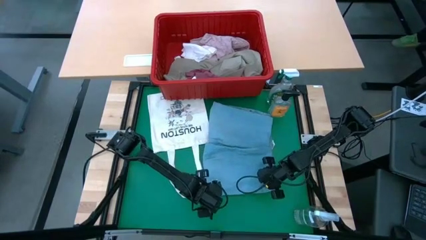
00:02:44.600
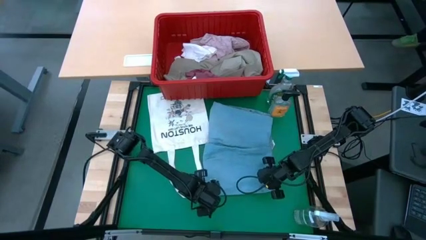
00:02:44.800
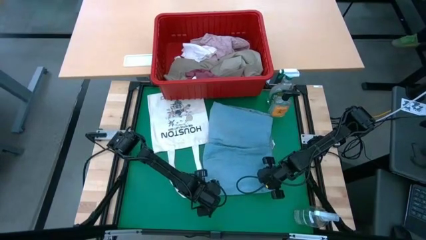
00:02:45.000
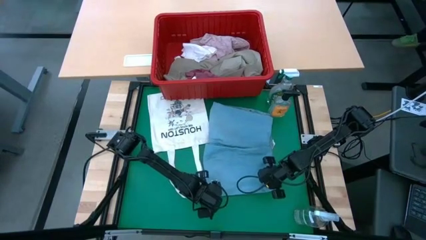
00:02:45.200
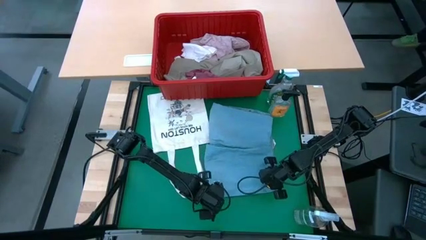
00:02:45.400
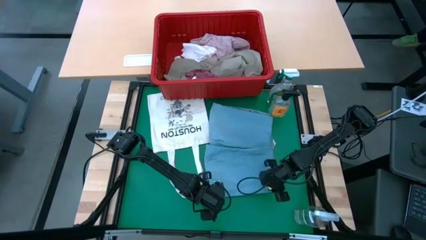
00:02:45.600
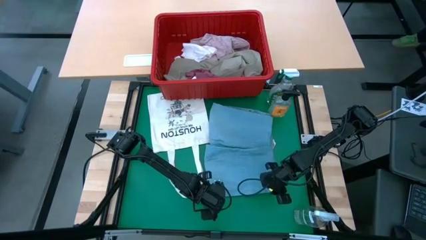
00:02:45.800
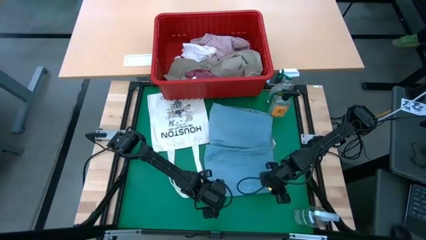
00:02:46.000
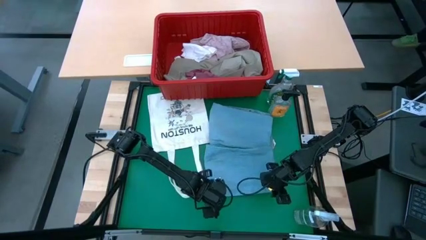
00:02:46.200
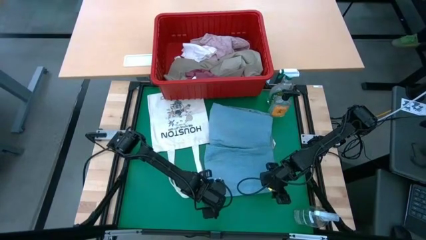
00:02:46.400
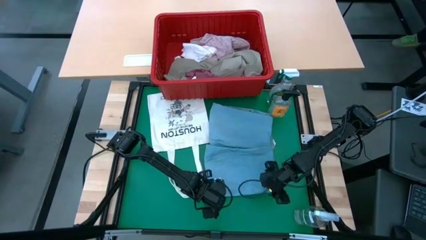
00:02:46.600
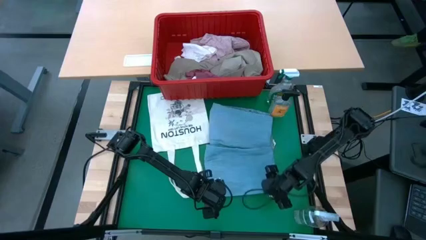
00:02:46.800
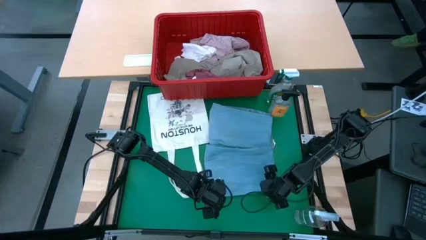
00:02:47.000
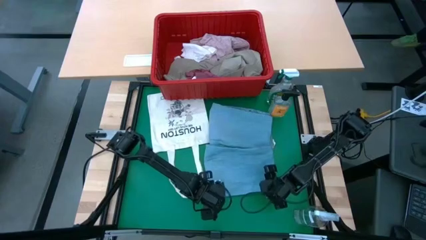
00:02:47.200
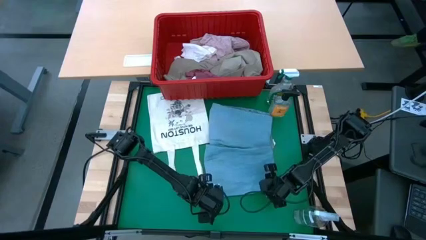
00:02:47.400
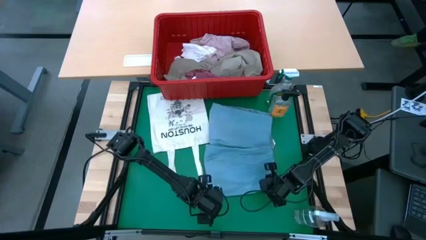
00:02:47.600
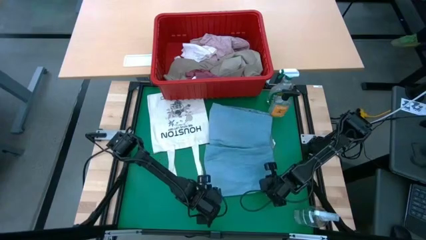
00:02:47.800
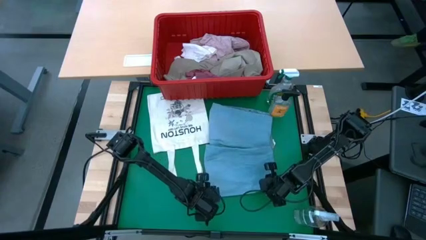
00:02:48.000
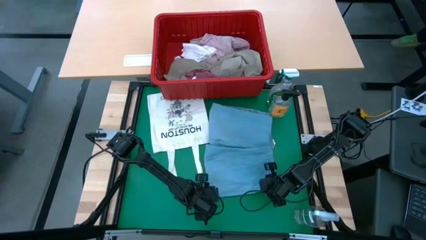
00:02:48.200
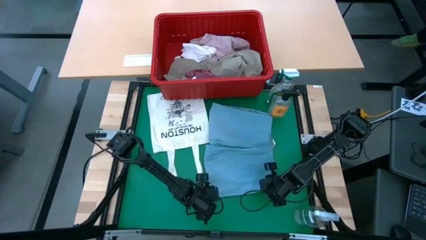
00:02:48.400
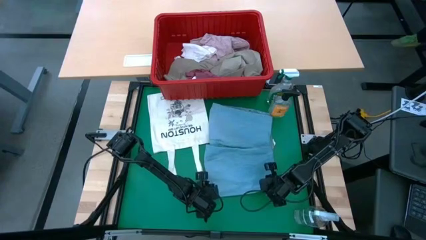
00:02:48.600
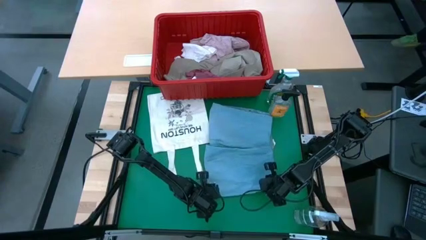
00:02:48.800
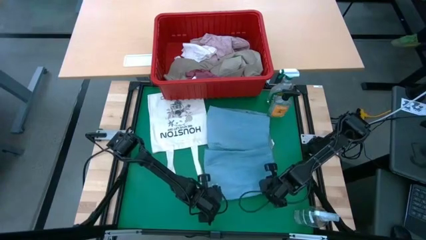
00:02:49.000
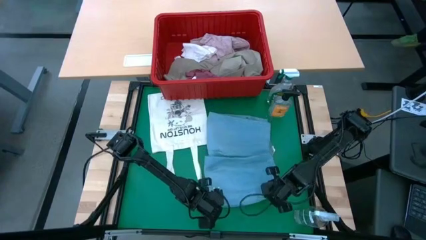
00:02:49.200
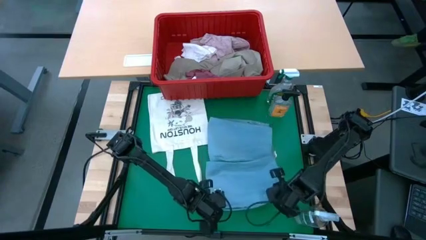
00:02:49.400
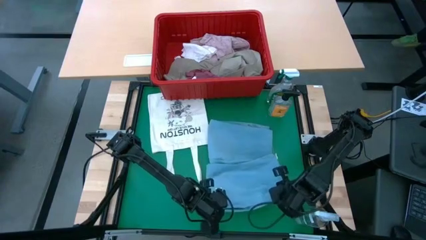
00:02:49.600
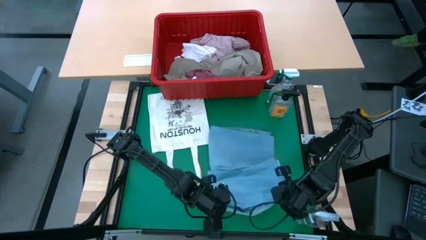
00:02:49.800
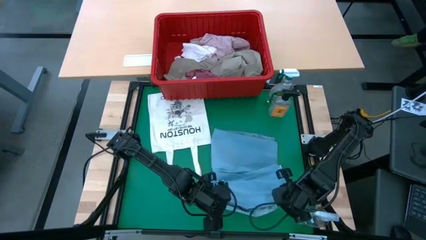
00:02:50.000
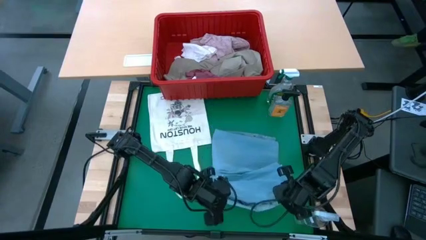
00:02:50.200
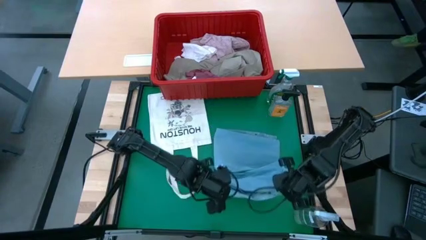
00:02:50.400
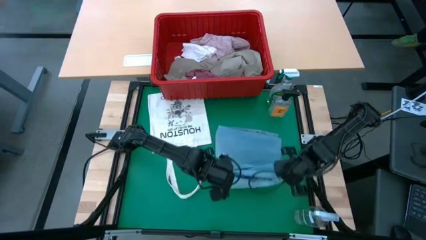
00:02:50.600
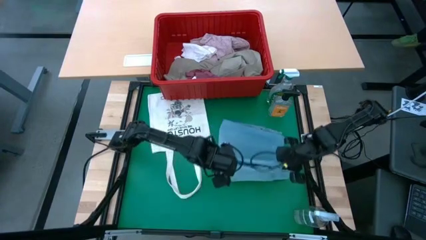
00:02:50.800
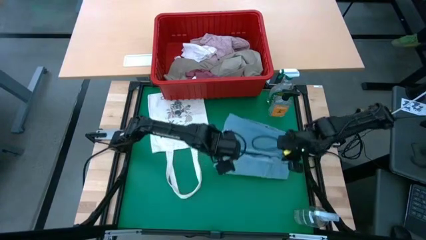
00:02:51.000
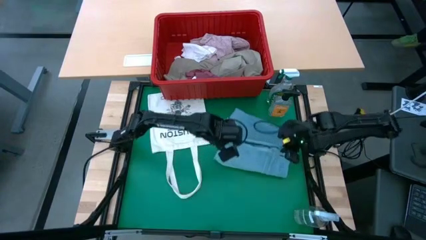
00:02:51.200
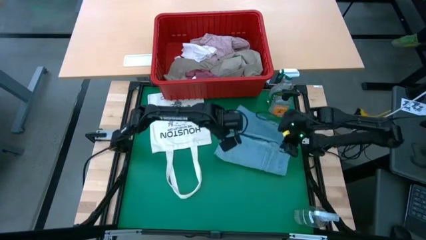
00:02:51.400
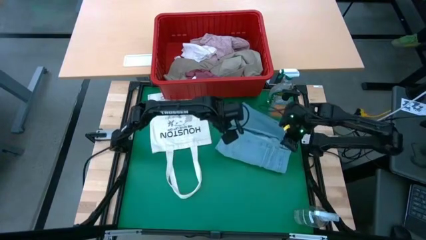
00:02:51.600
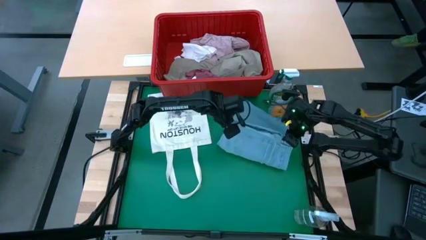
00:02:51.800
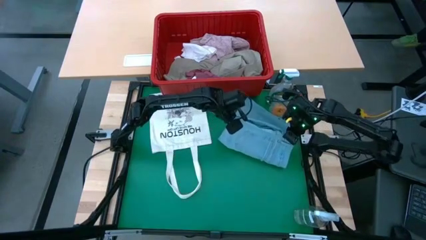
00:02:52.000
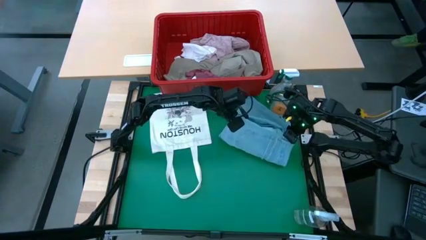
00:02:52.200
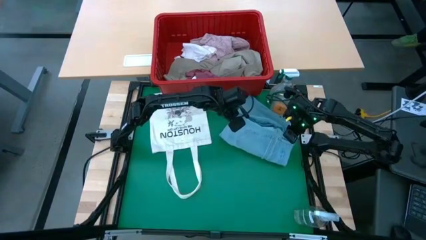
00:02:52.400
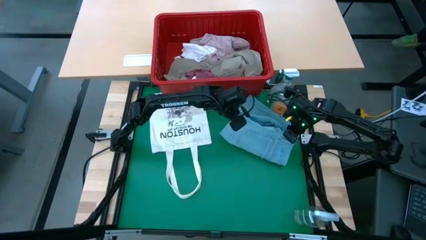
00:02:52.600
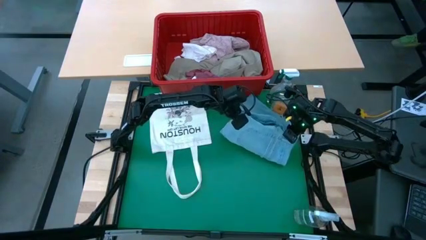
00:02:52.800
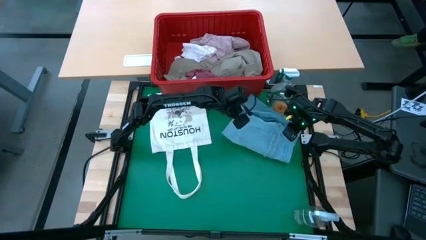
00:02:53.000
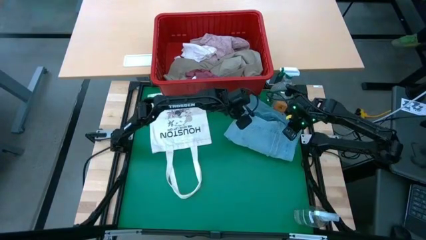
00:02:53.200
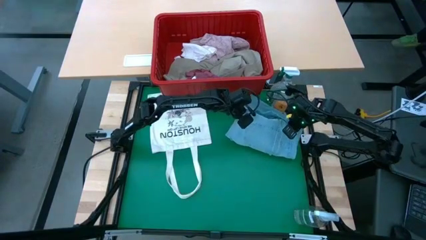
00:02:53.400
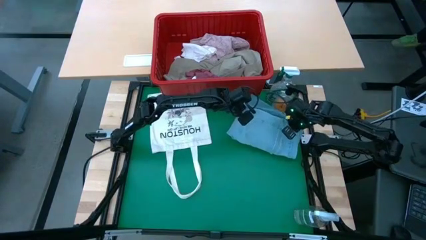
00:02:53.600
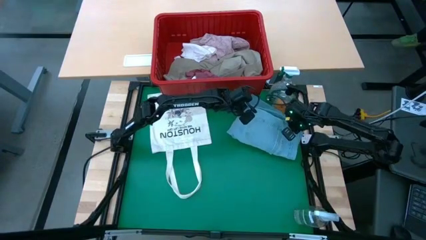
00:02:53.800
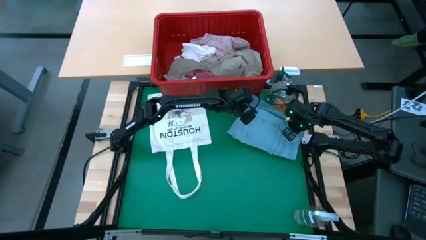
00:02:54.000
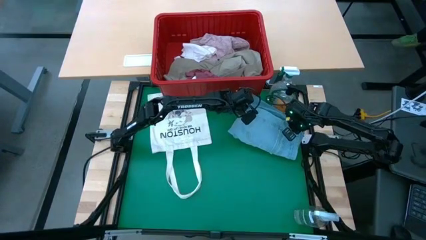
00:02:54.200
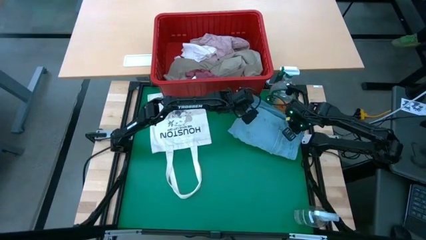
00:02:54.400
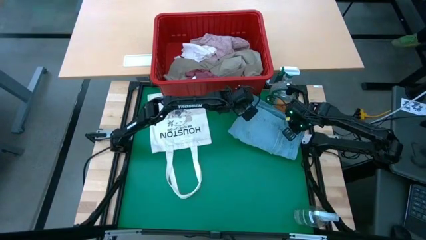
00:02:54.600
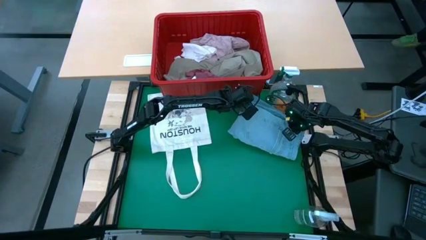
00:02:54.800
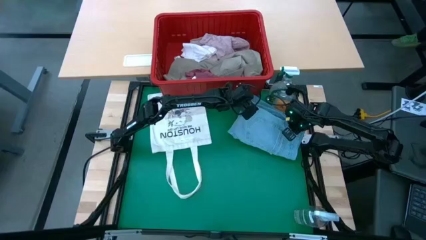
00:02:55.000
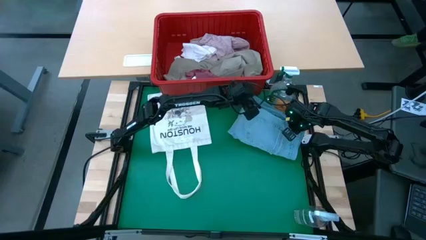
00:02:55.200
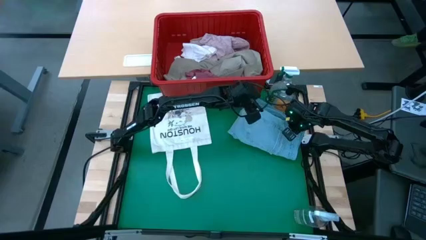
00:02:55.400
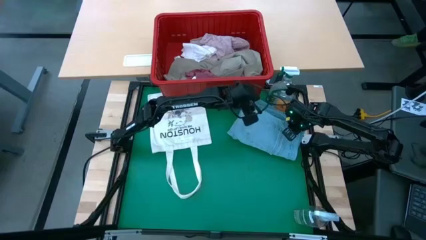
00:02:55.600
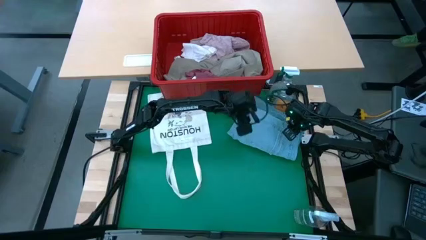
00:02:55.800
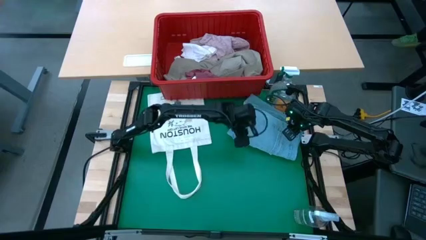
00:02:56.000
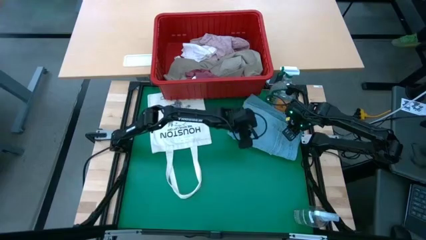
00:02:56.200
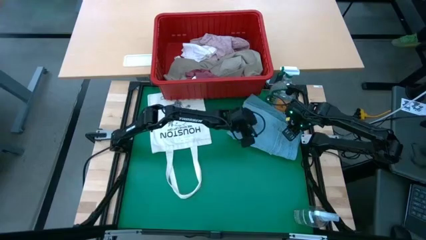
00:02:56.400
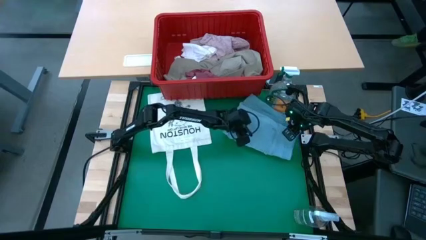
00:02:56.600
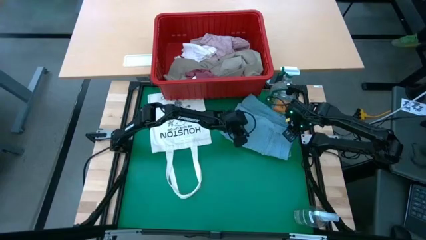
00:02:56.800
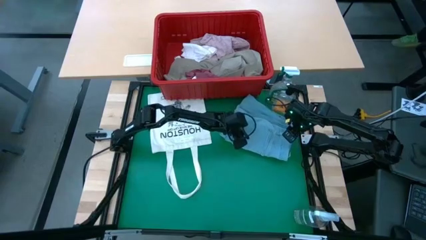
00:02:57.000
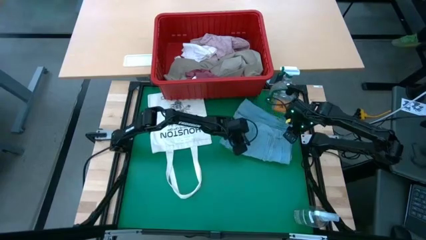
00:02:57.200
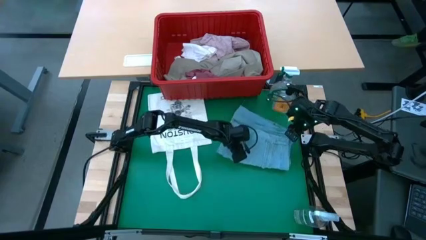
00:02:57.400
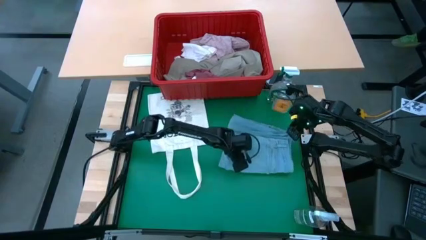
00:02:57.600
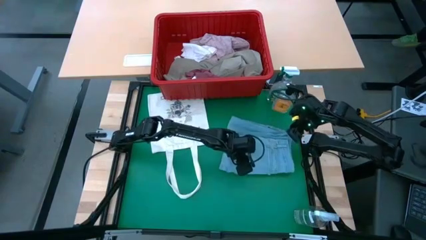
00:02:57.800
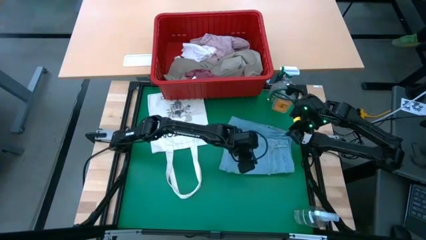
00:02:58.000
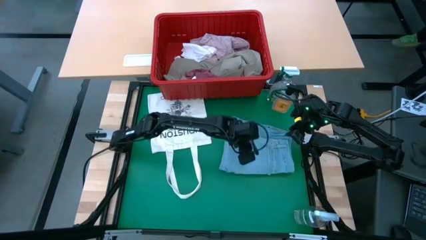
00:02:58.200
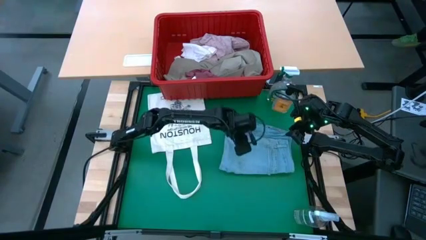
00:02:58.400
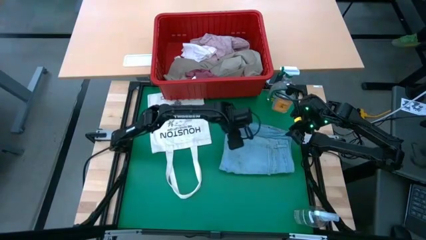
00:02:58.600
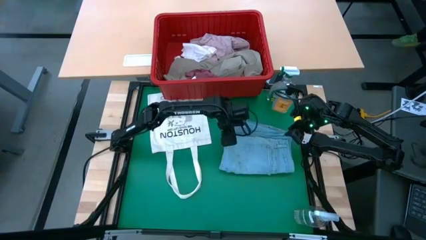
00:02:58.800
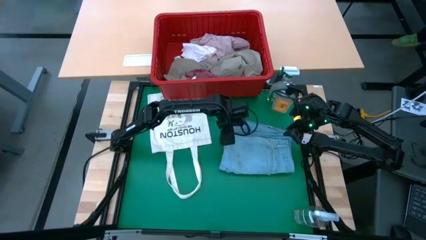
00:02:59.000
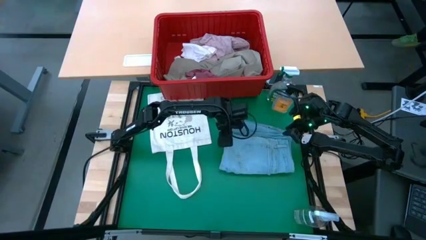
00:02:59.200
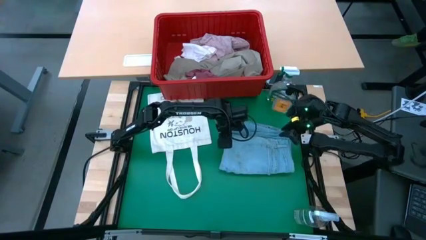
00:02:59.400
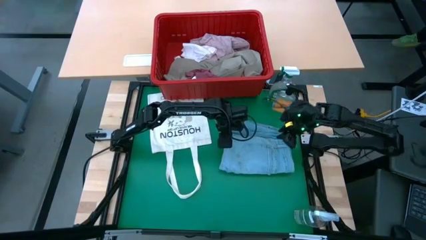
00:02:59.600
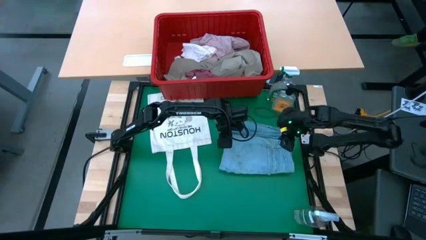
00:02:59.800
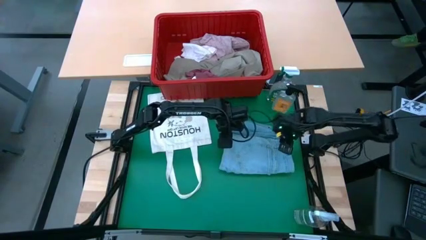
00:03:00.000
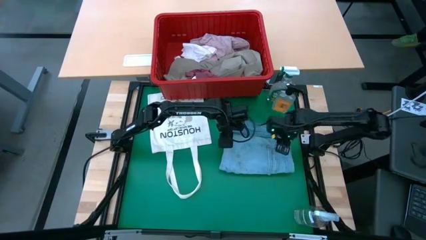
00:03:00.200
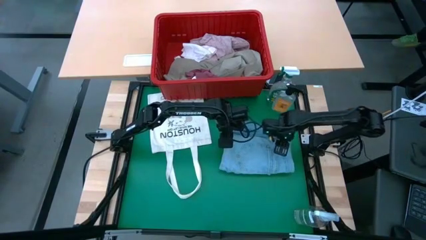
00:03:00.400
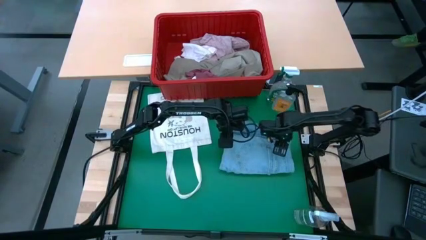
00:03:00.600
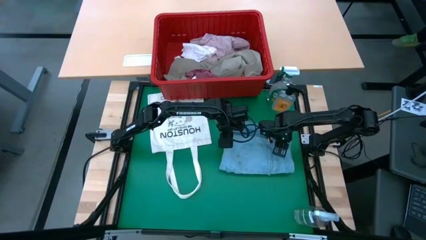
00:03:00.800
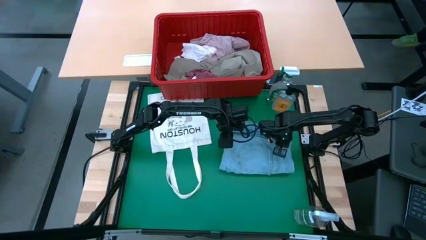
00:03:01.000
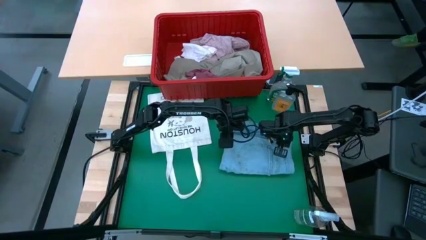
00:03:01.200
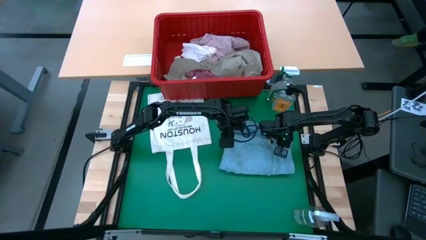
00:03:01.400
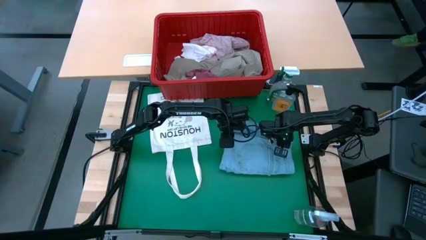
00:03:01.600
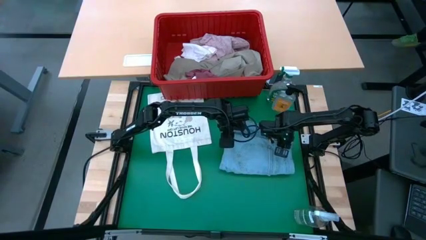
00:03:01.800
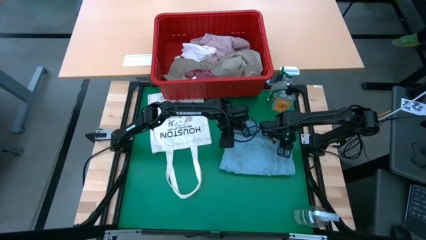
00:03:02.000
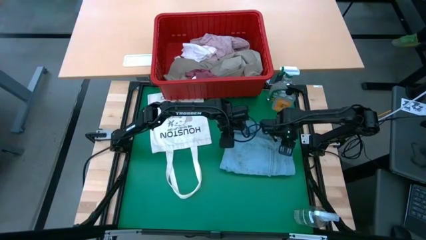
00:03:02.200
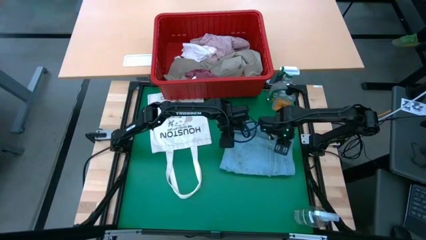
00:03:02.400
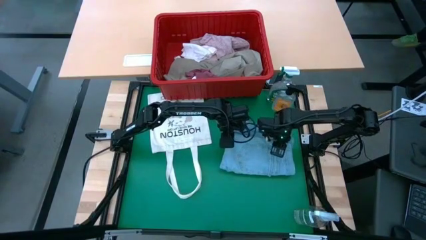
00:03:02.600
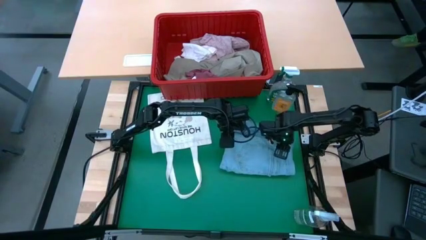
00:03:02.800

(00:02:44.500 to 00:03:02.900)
Task: Fold laundry
Fold the light blue pants
